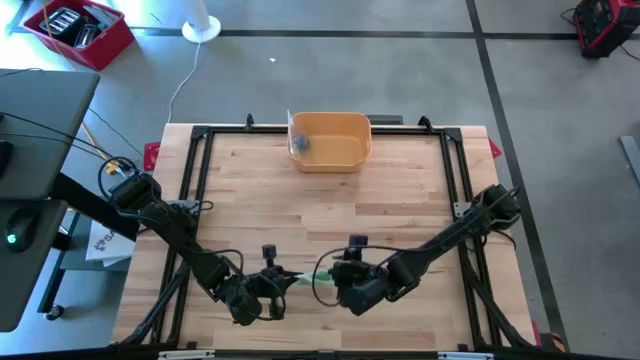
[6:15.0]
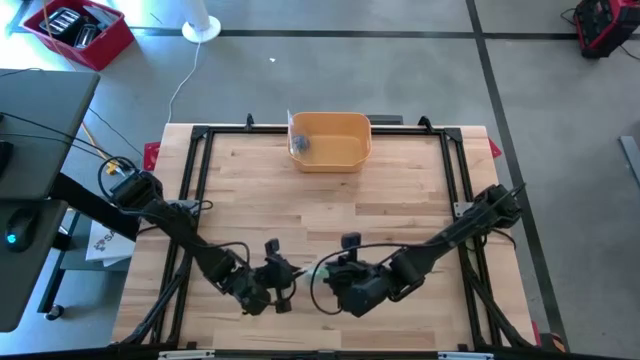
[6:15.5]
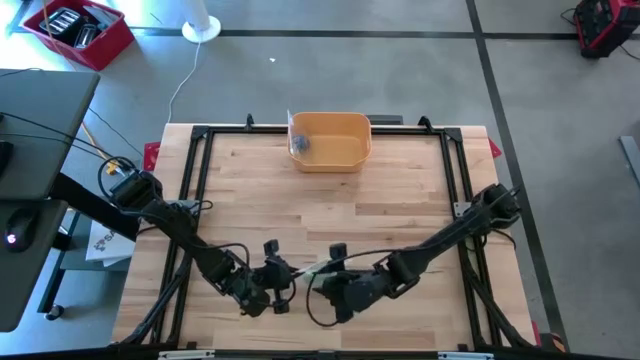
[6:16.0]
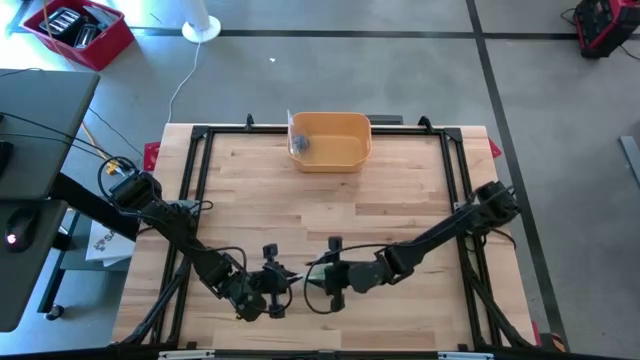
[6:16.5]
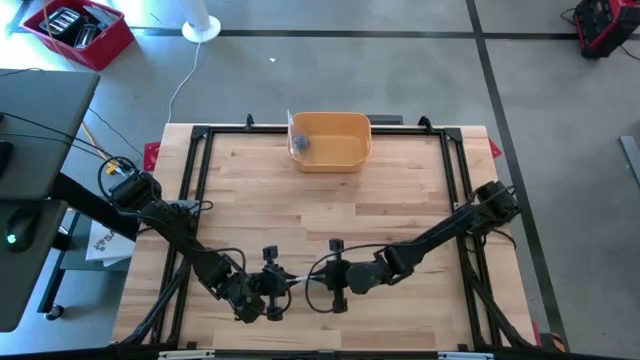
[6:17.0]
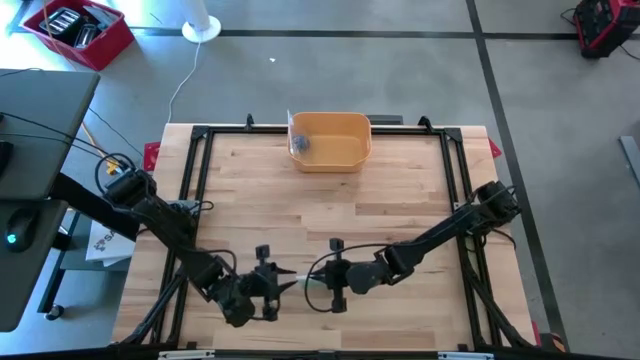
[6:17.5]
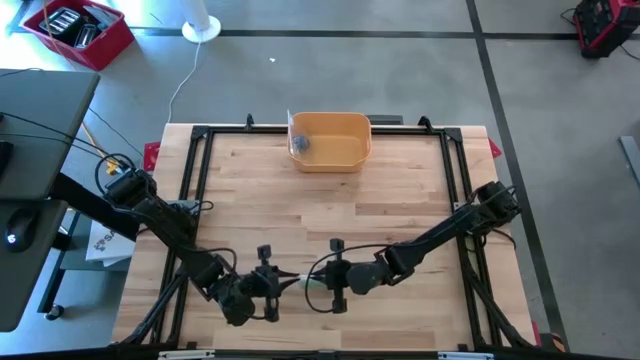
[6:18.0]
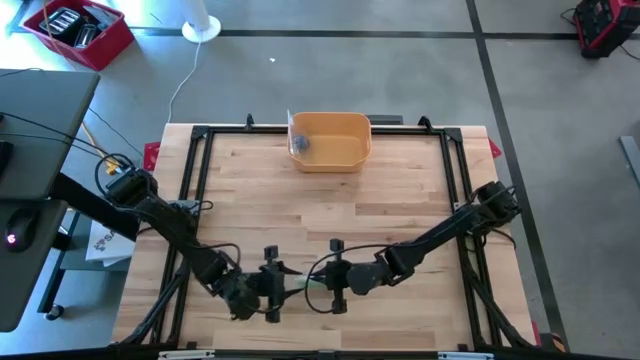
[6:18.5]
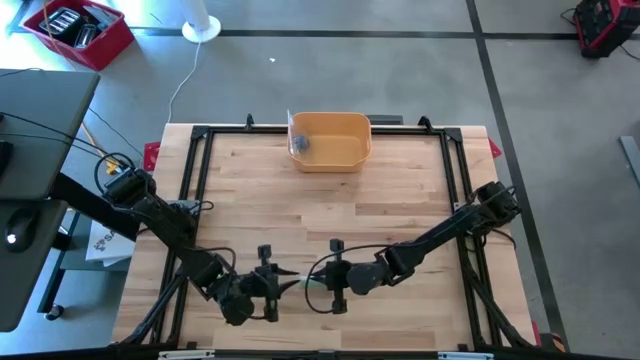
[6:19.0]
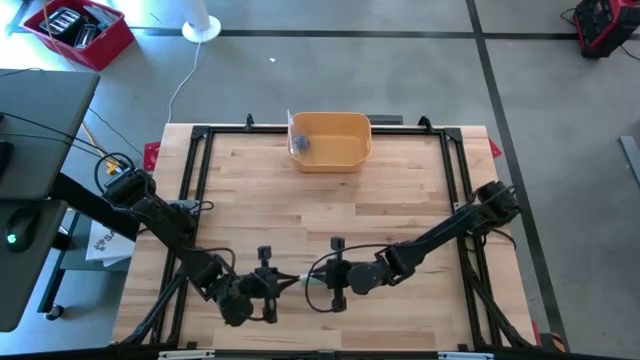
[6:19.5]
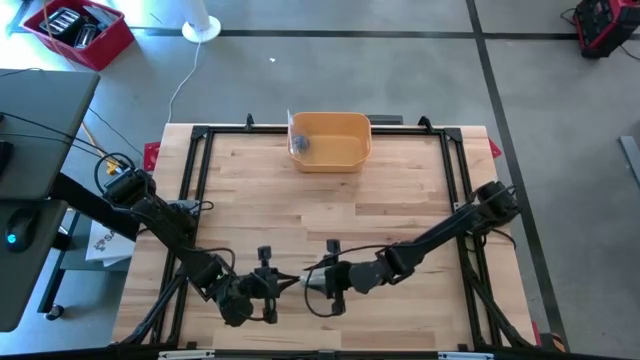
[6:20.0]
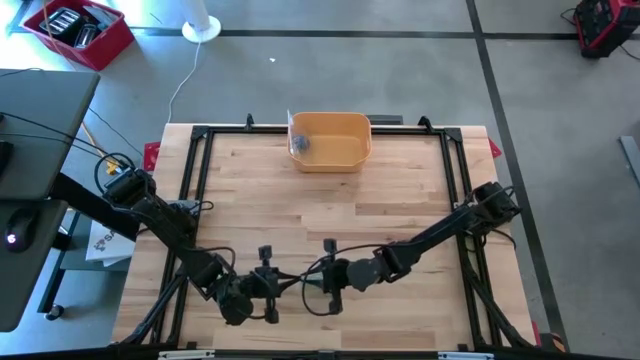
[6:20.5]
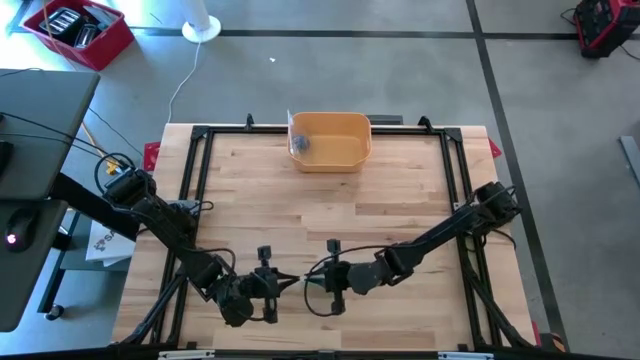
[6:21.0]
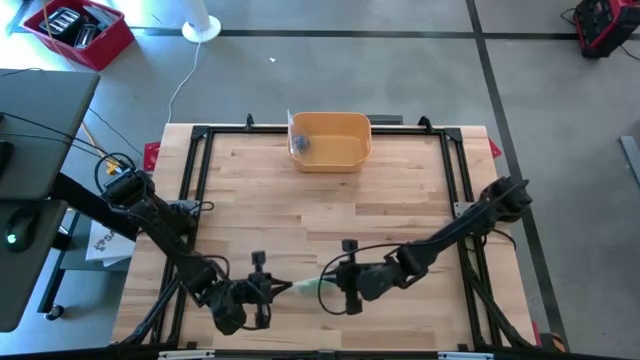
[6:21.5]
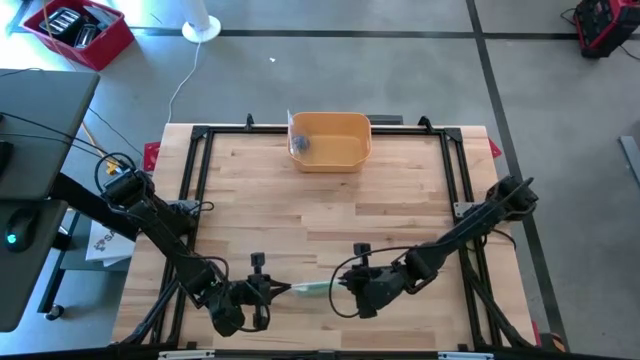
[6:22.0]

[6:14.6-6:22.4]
Task: Roll bandage
Close the transparent zip bag with the rolled green bandage

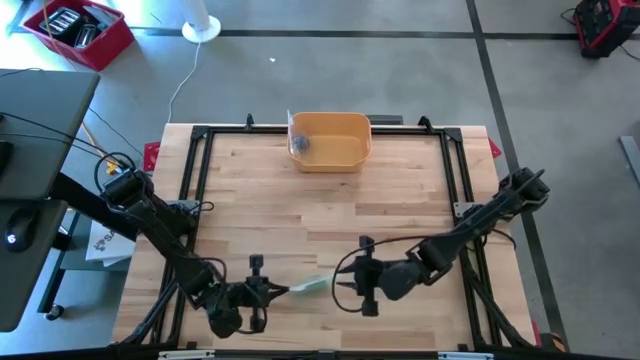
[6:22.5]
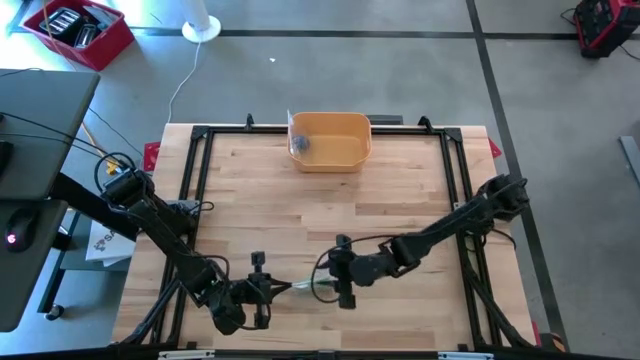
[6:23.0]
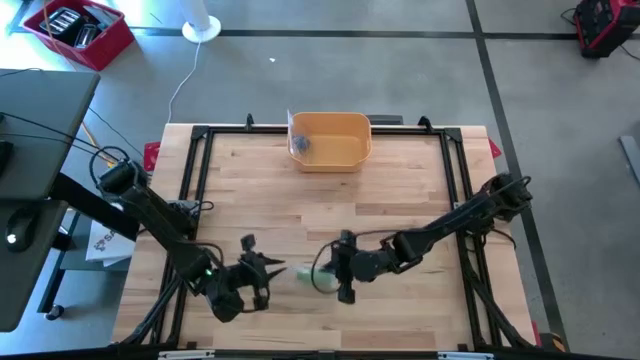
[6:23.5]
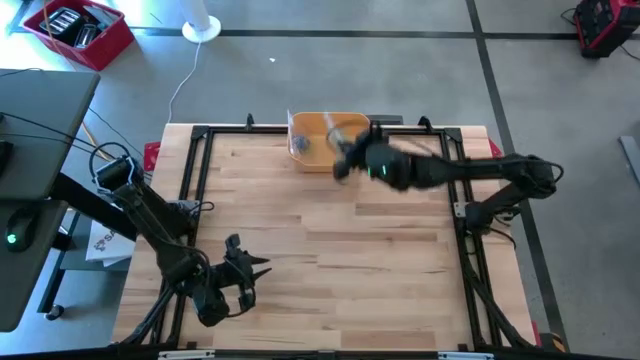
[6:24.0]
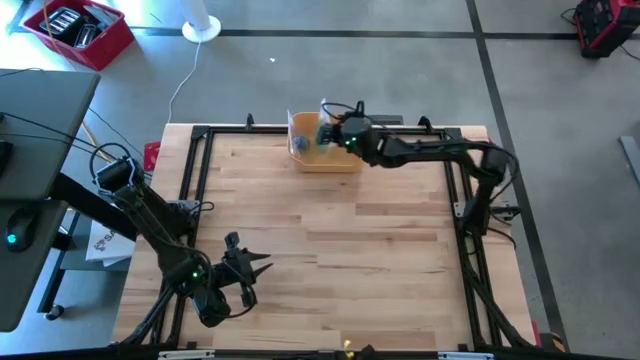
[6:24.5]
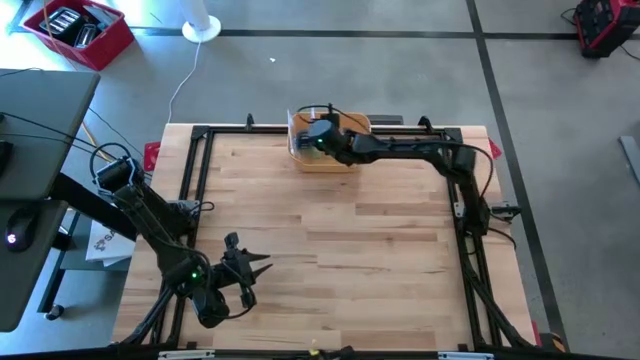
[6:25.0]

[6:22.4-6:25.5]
Put the transparent zip bag with the rolled green bandage into the yellow bin

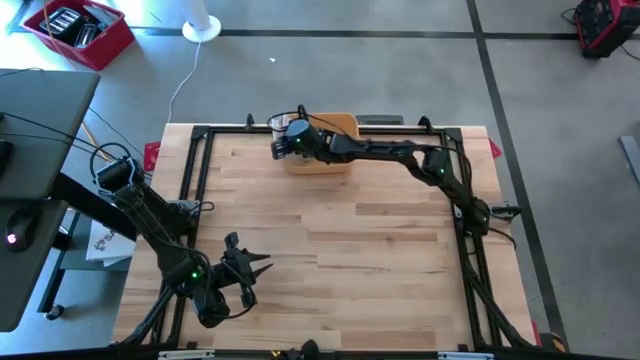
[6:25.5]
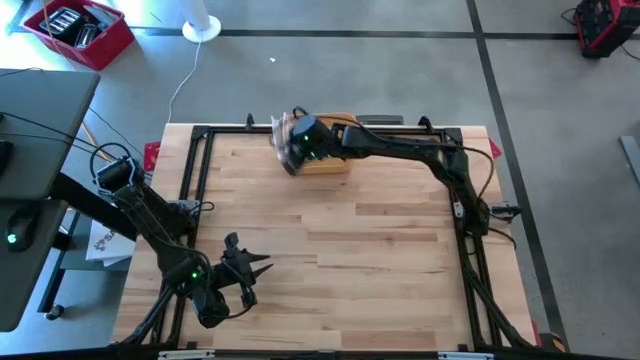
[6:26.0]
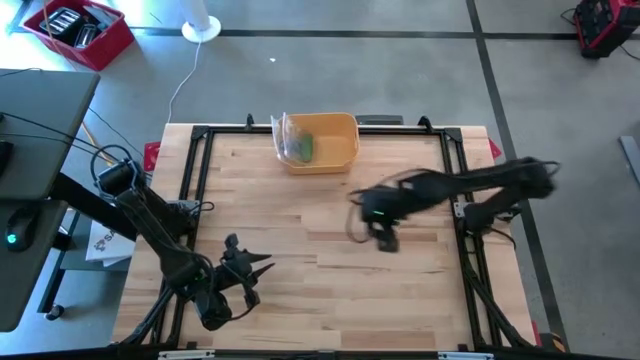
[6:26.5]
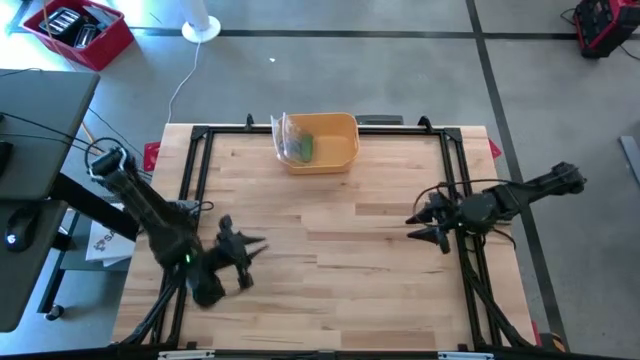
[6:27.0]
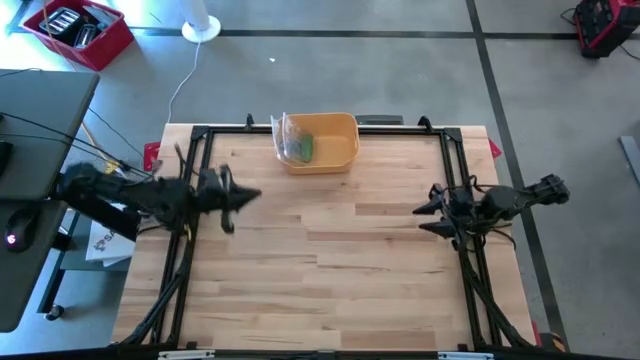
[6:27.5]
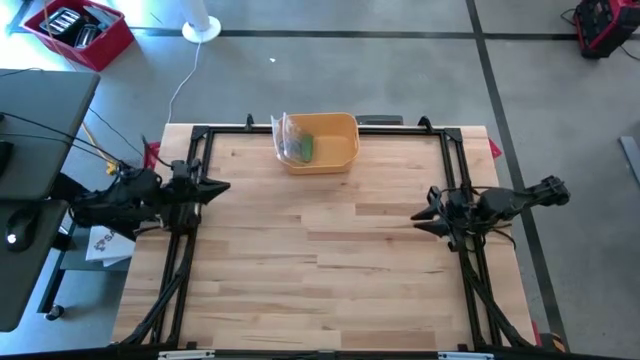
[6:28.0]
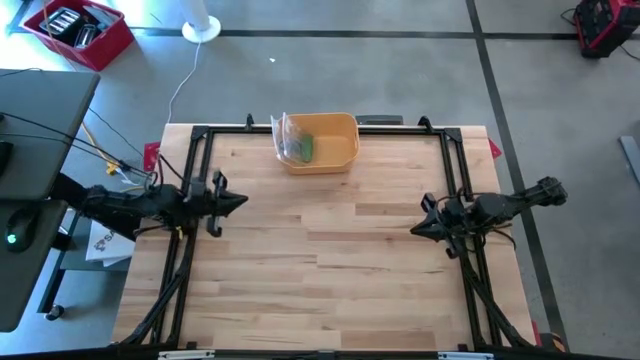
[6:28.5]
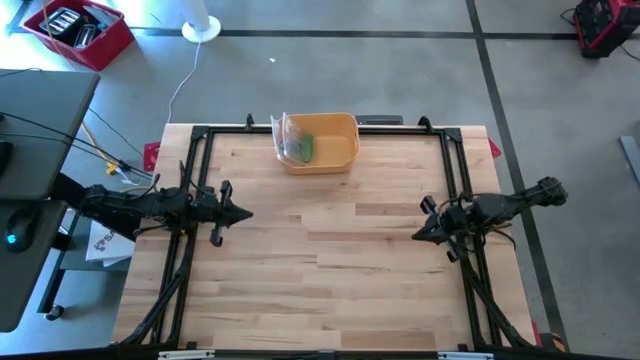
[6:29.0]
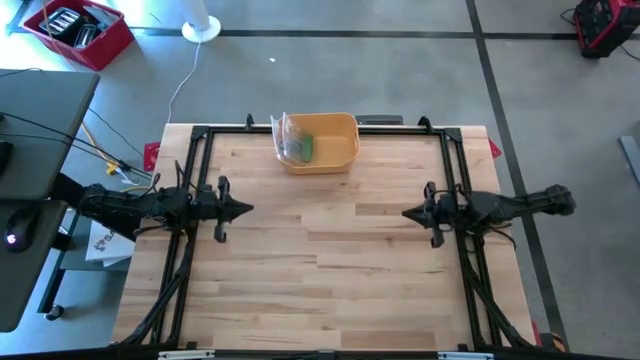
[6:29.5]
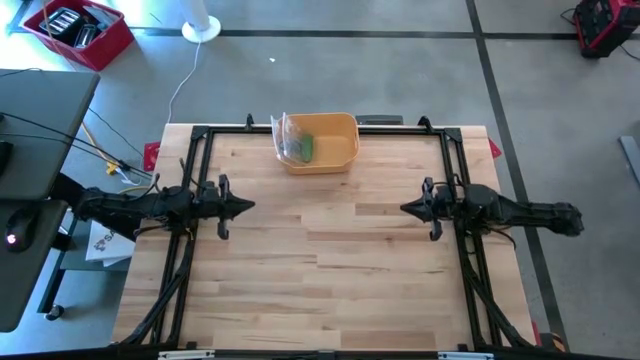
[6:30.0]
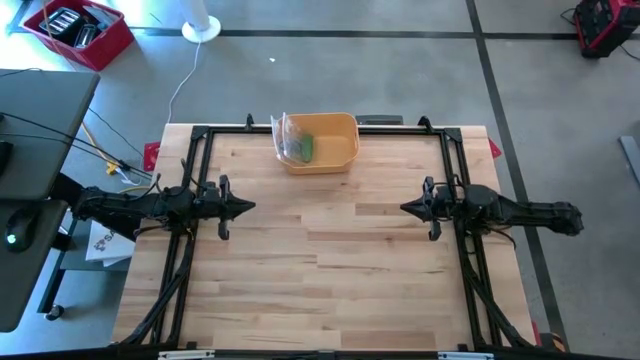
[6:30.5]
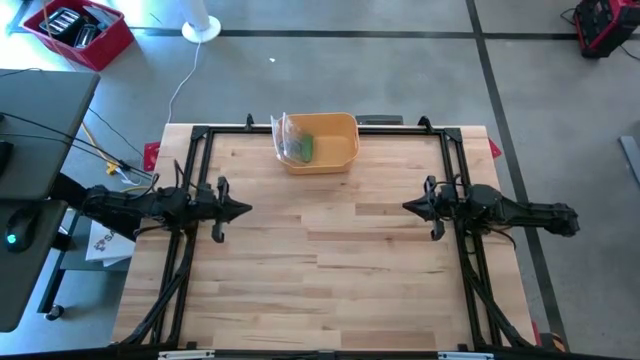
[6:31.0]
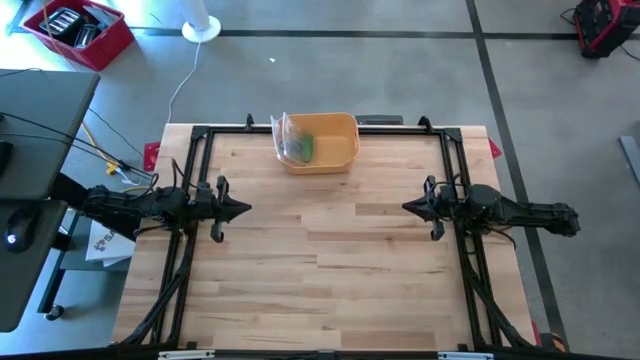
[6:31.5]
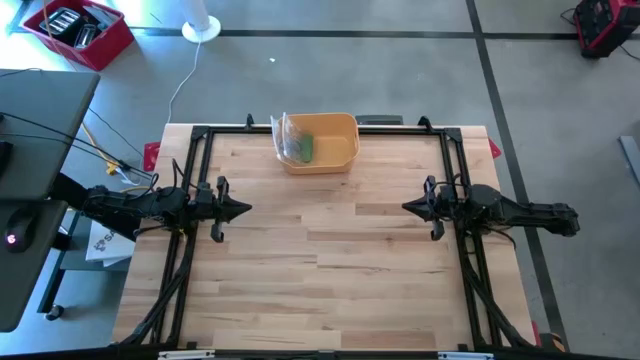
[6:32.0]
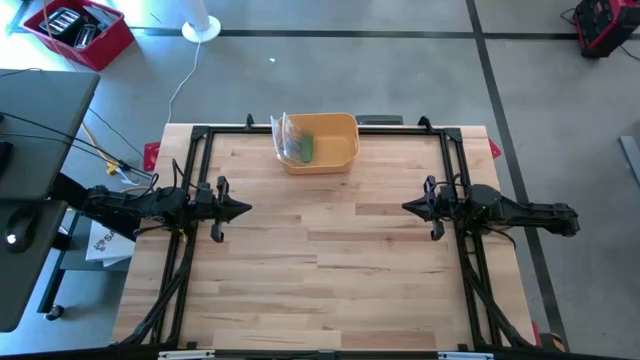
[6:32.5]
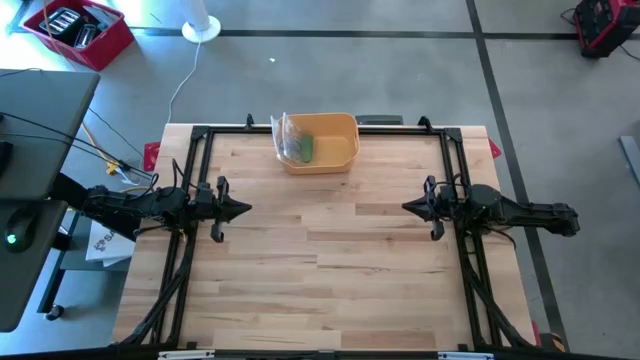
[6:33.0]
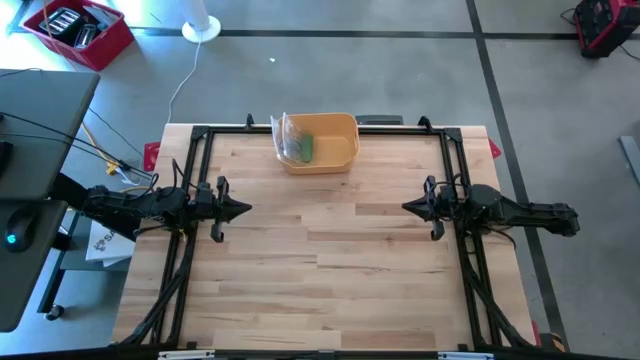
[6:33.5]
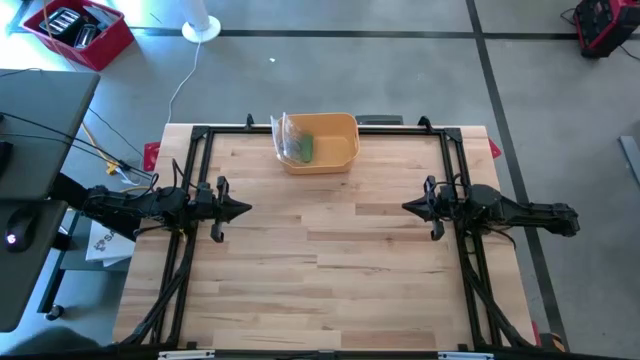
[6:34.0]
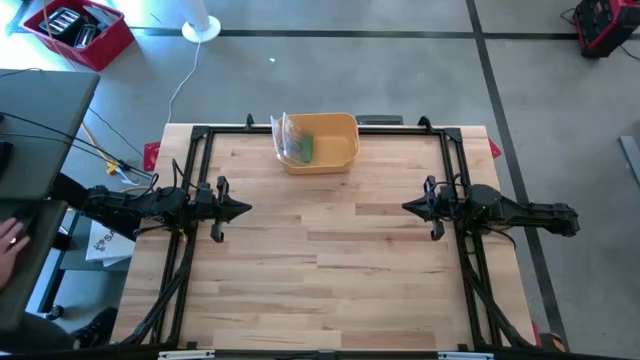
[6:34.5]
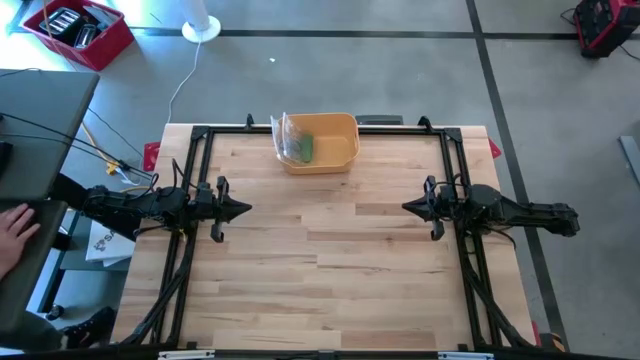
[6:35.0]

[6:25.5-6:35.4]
Return to Home Position
